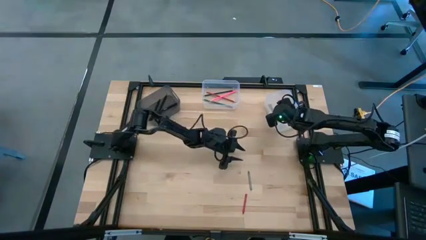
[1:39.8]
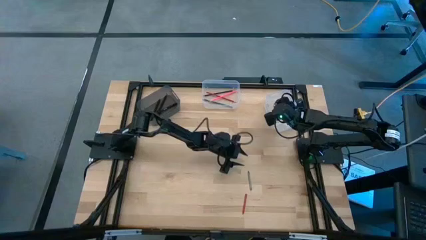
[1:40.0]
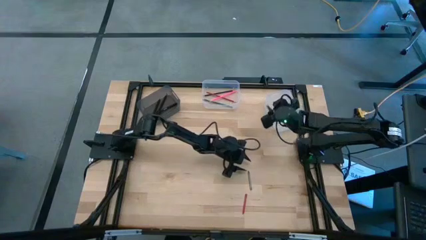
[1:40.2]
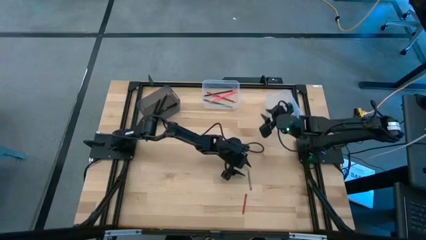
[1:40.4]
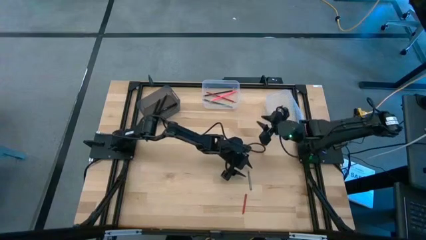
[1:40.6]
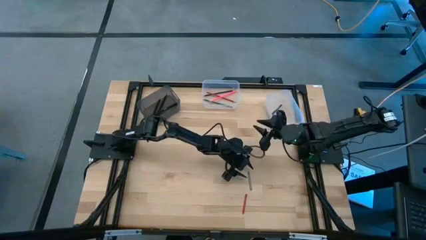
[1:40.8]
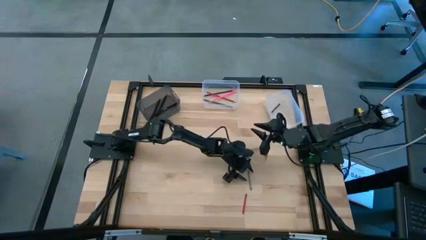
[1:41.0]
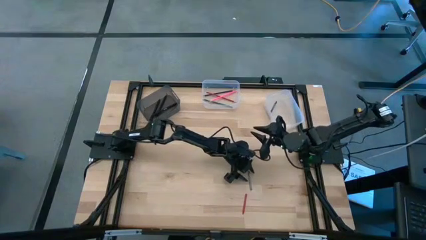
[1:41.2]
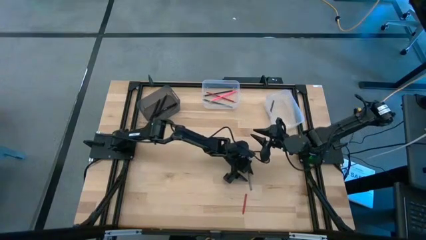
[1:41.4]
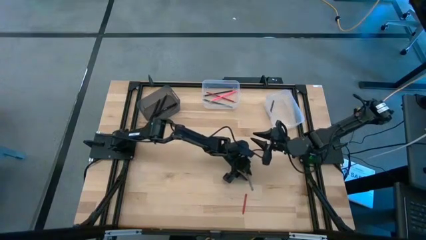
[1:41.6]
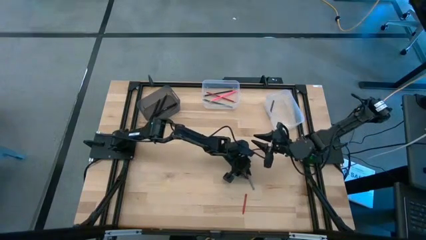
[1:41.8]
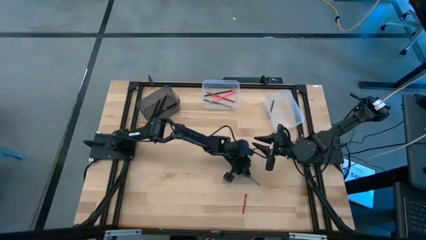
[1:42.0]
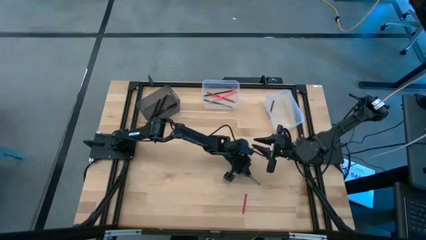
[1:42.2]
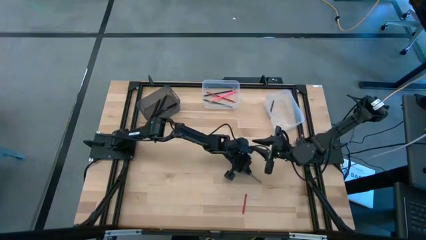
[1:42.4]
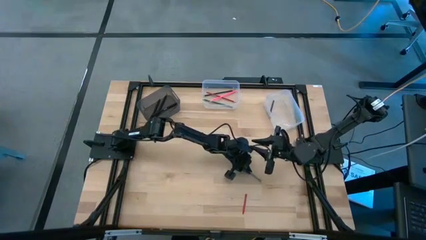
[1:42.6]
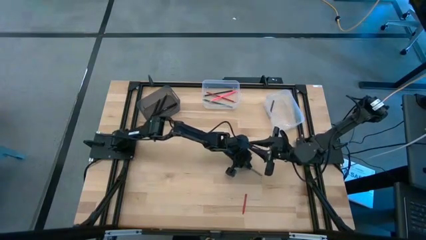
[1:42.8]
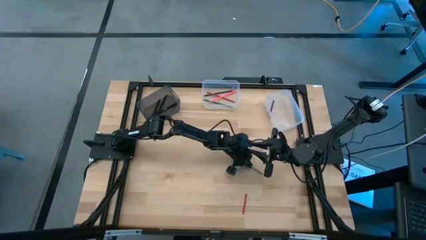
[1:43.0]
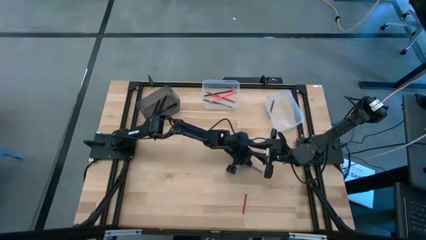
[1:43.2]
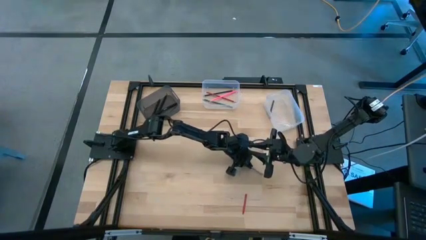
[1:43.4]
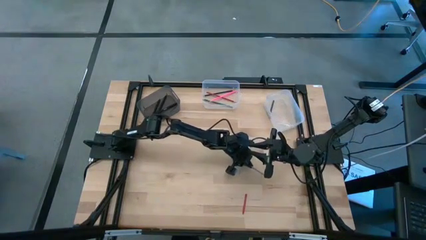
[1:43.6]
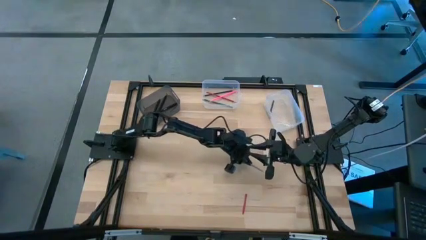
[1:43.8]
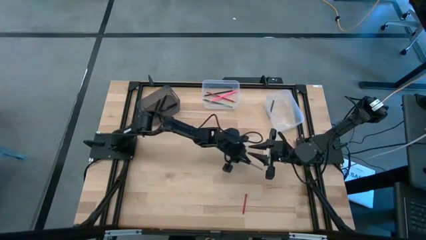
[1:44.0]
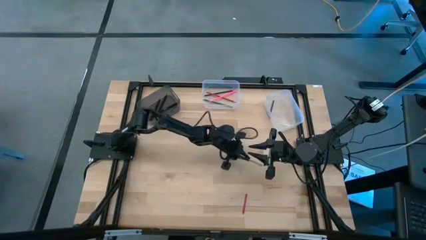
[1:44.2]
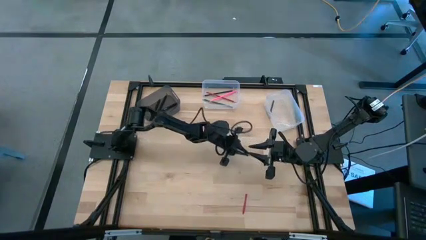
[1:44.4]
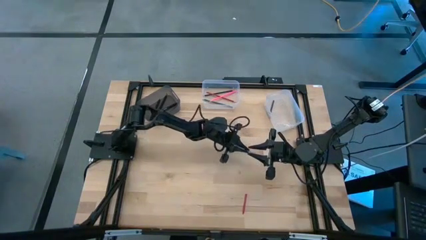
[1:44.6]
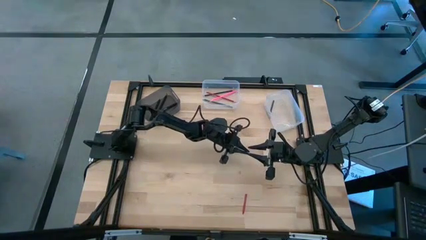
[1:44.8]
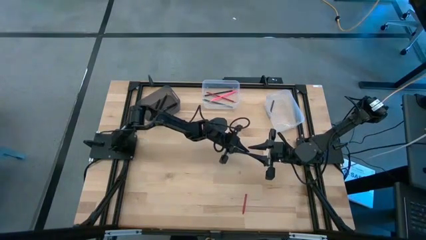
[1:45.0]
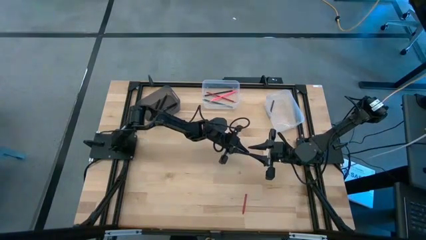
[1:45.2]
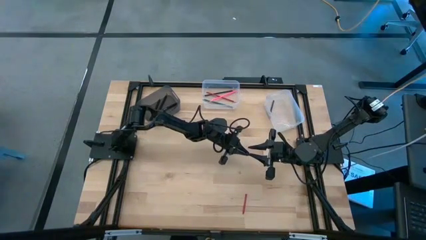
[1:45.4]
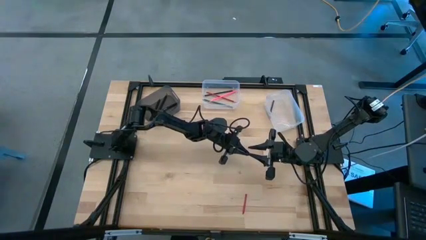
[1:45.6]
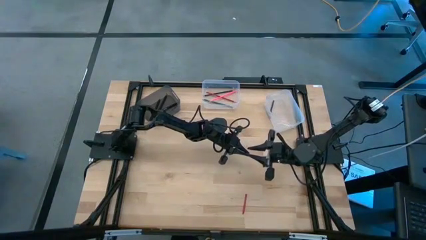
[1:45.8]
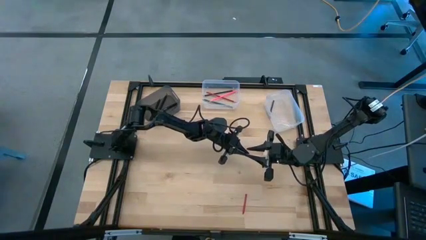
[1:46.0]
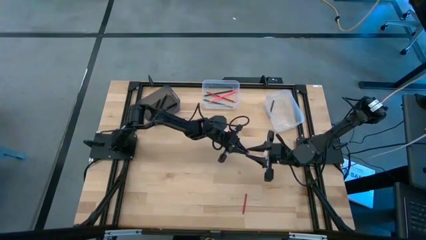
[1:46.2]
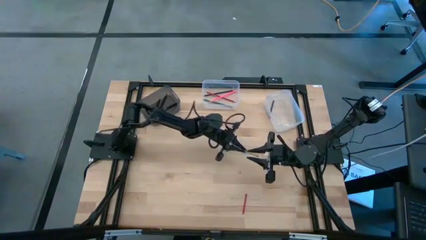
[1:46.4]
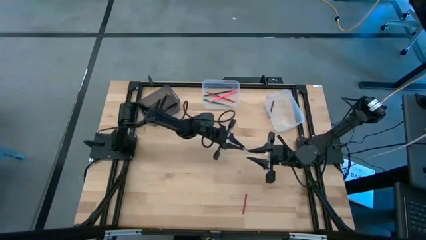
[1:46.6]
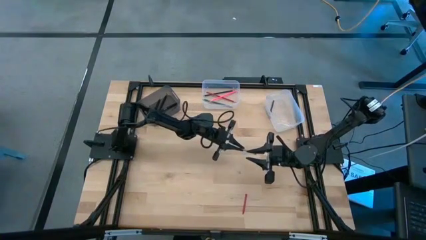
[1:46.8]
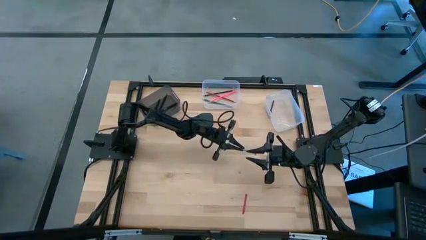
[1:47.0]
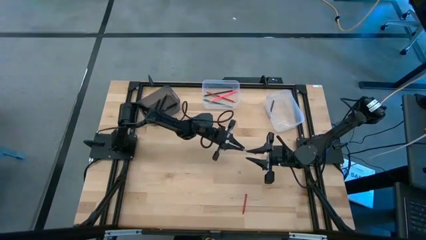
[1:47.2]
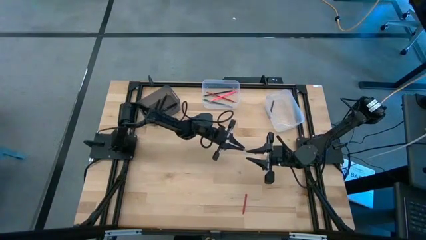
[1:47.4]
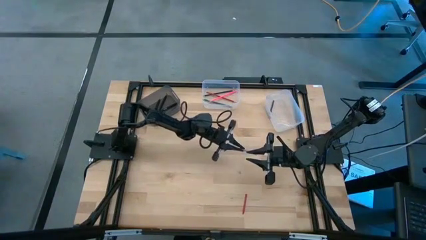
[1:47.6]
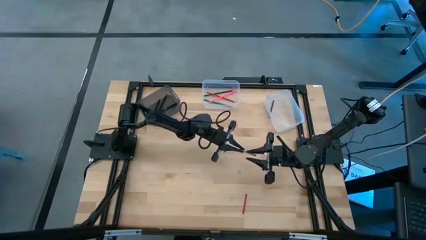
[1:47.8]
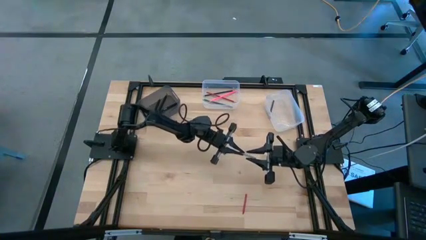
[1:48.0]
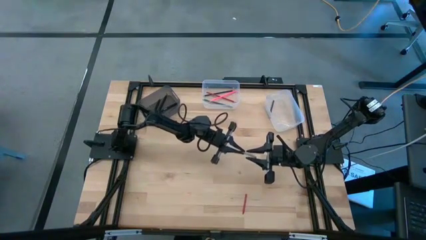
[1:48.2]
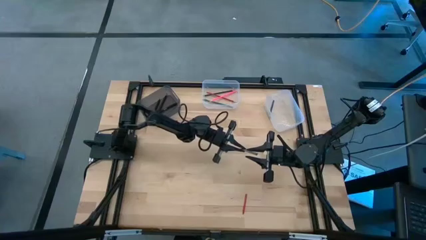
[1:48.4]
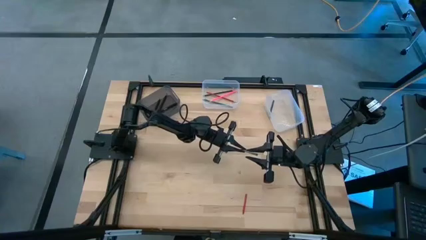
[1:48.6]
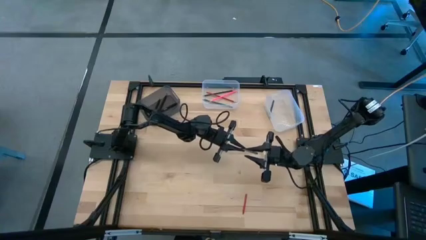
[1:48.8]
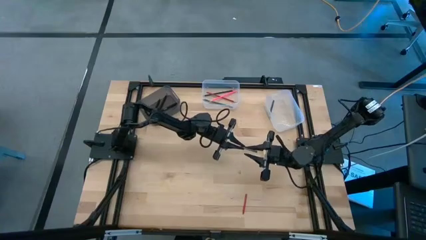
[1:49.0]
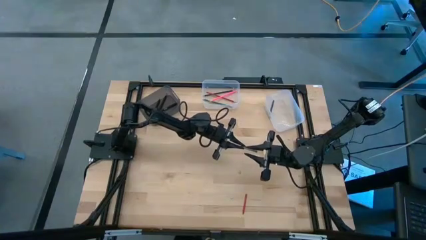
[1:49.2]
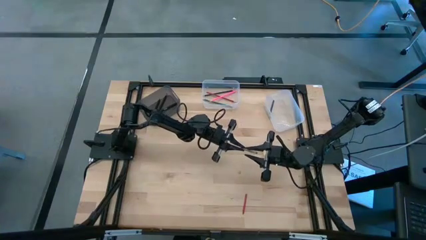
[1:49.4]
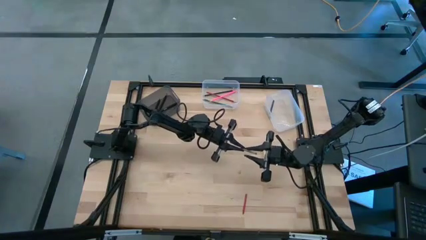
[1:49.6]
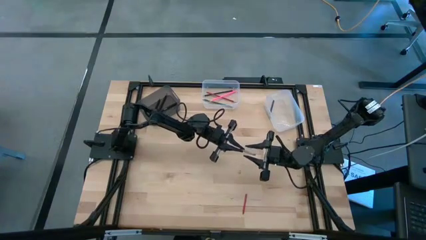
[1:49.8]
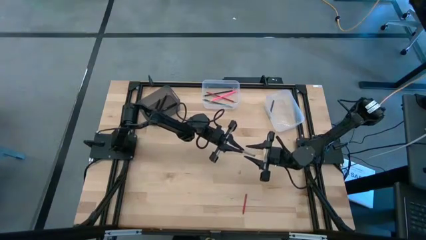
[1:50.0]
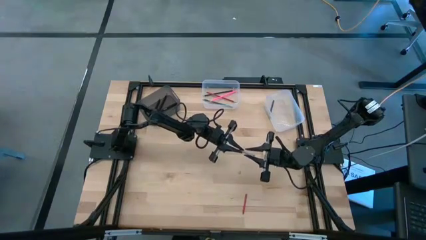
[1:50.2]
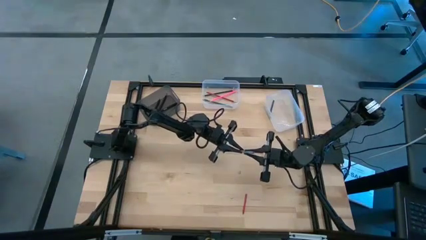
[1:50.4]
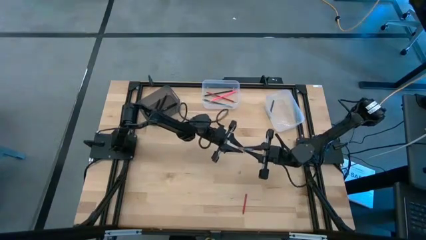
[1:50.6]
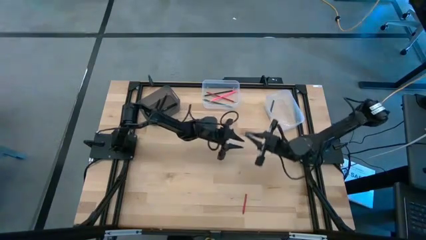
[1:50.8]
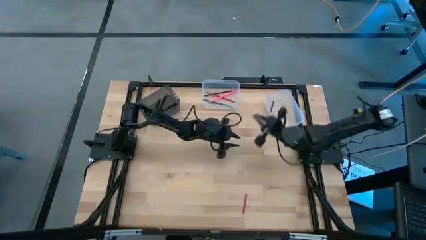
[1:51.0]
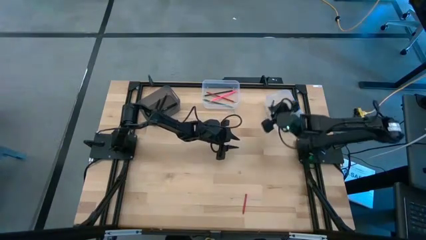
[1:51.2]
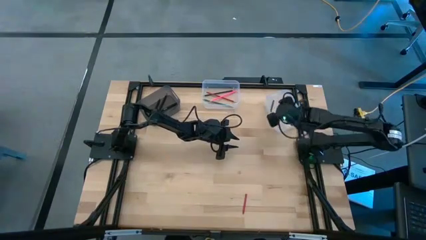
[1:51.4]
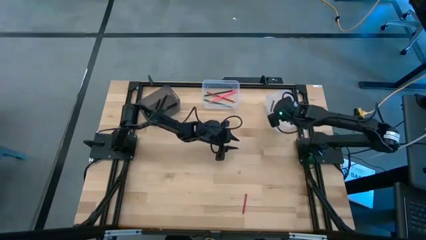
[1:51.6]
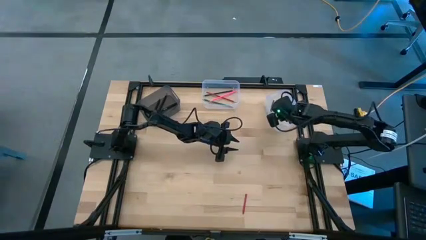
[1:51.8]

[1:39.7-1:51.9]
Task: Sort crayons/erasers/pens/pencils in bins
Put the gray crayon into the right transparent bin

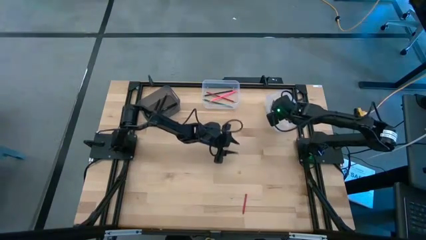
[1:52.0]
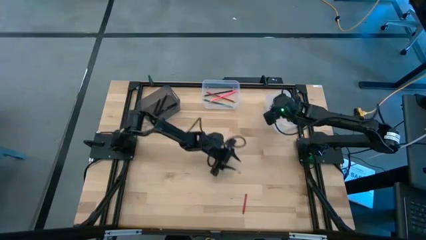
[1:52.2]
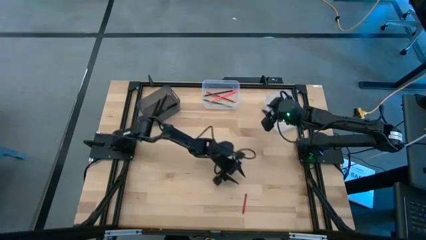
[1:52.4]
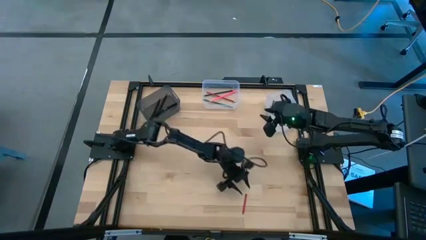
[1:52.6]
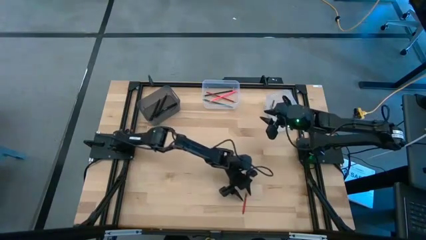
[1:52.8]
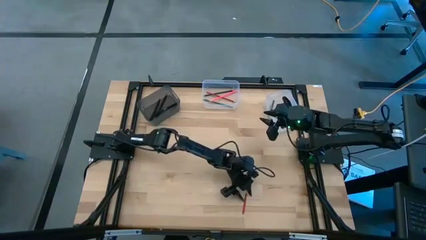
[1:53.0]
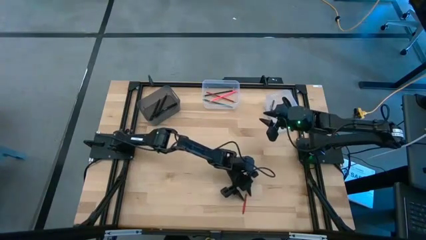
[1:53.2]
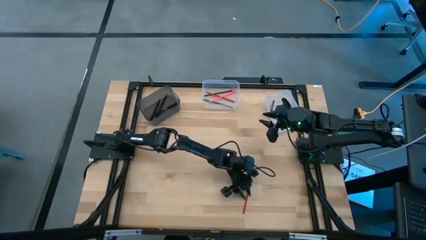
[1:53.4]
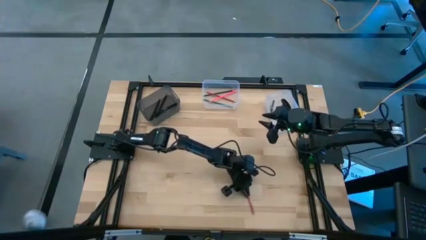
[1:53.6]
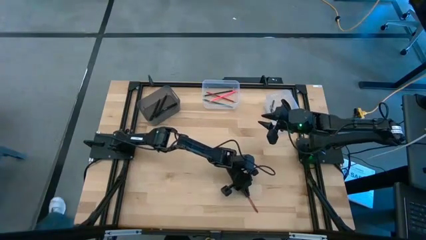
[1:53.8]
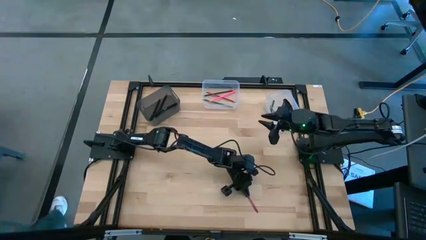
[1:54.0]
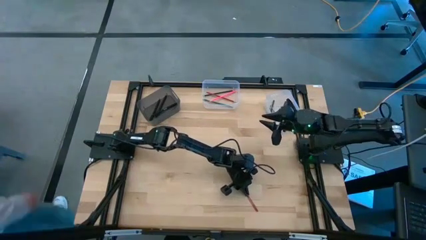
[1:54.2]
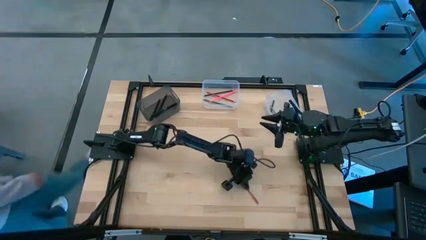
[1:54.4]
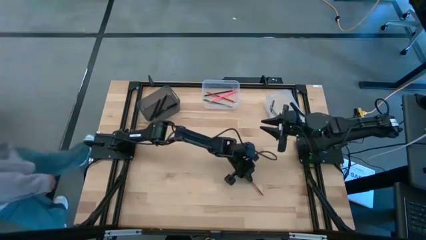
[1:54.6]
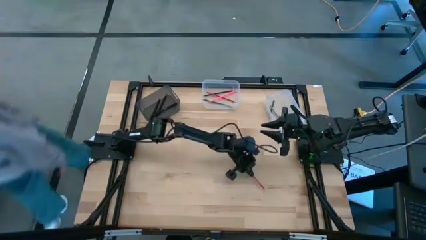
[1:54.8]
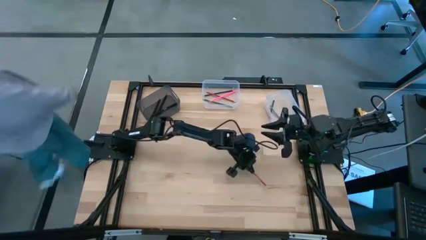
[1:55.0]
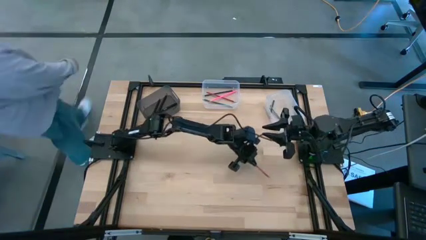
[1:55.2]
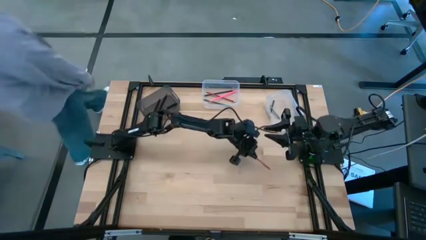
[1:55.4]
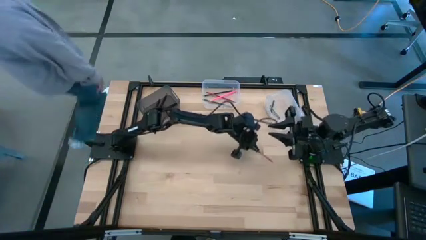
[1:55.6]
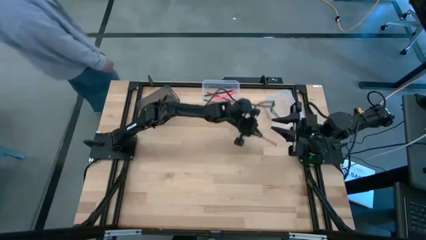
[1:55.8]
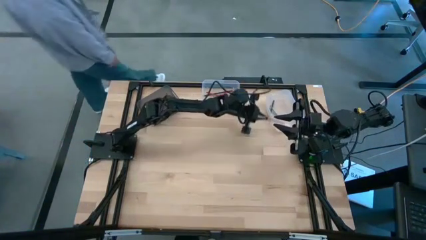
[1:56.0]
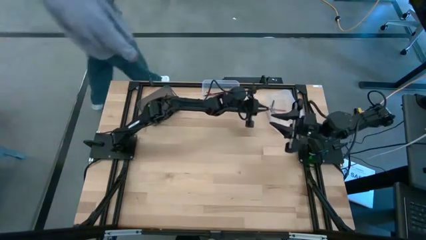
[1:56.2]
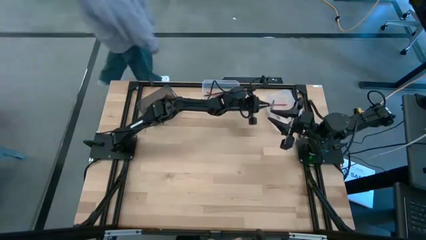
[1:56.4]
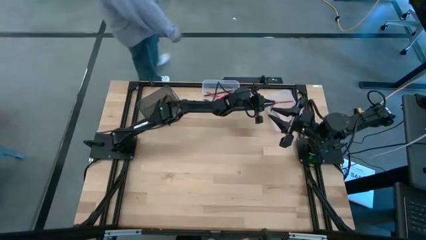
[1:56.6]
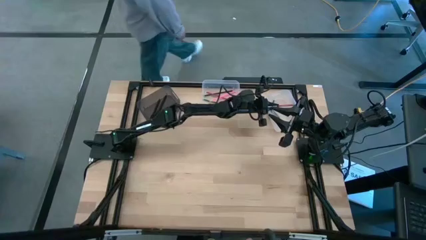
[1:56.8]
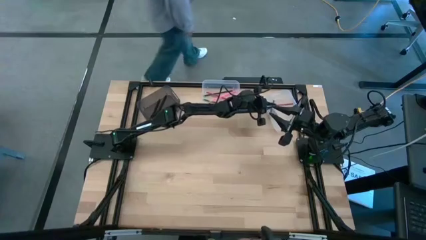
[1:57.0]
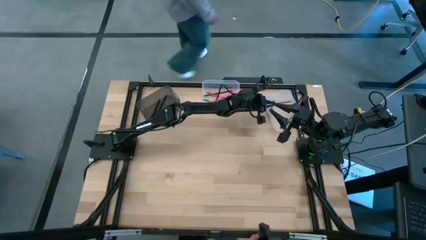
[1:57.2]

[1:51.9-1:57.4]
Put the red crayon into the right transparent bin
